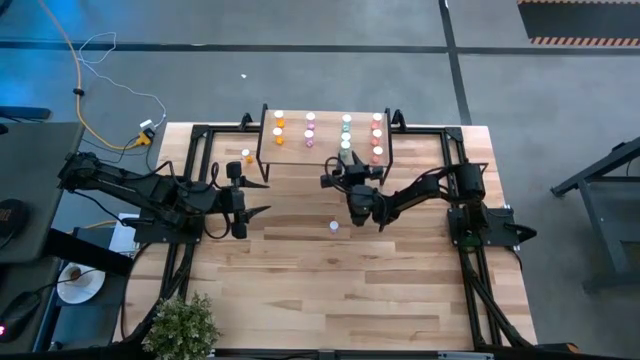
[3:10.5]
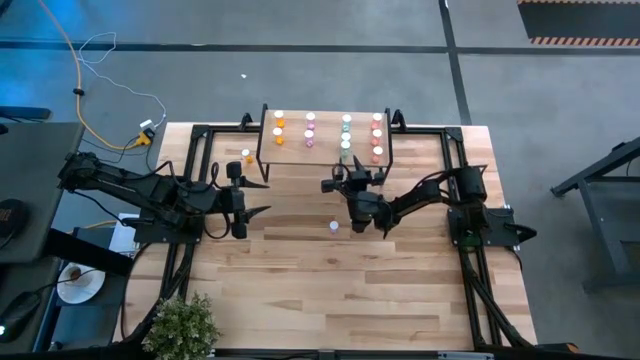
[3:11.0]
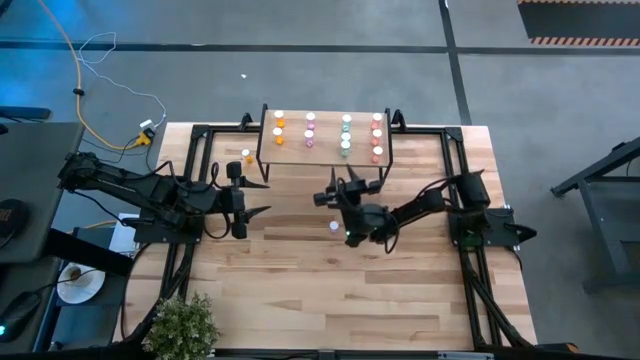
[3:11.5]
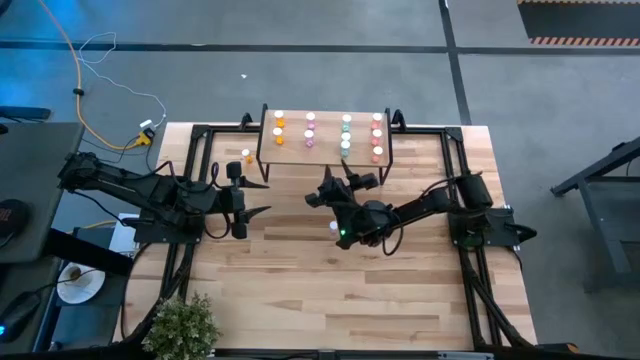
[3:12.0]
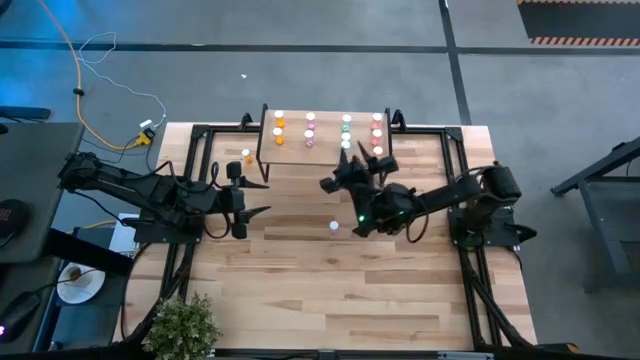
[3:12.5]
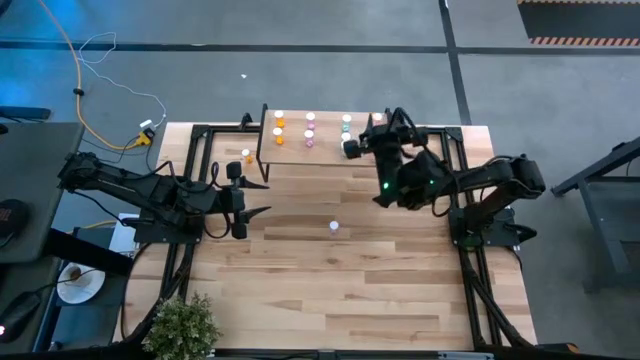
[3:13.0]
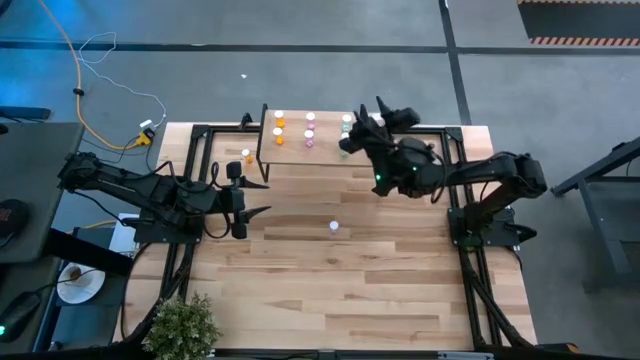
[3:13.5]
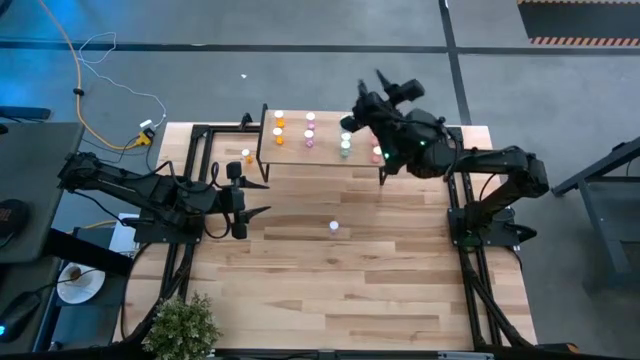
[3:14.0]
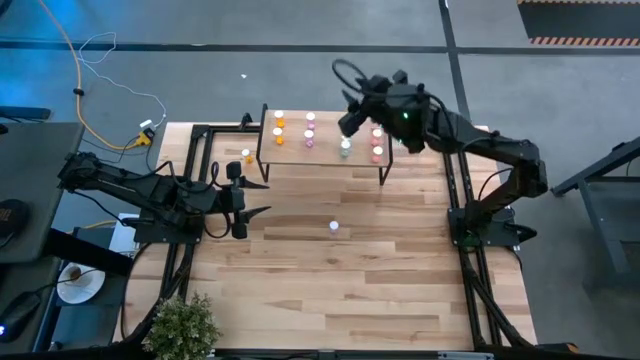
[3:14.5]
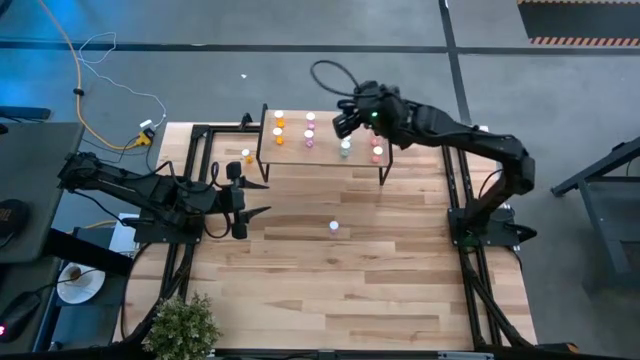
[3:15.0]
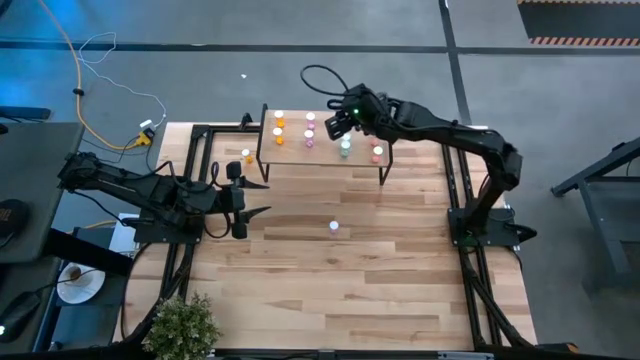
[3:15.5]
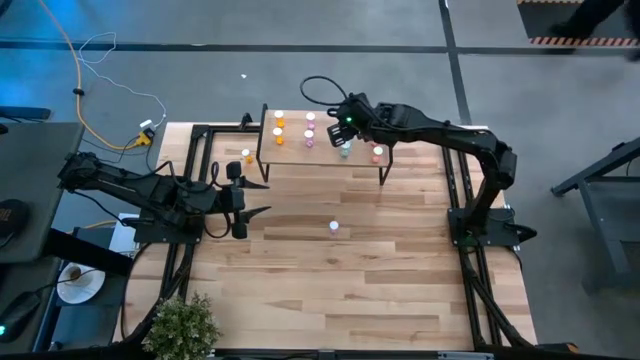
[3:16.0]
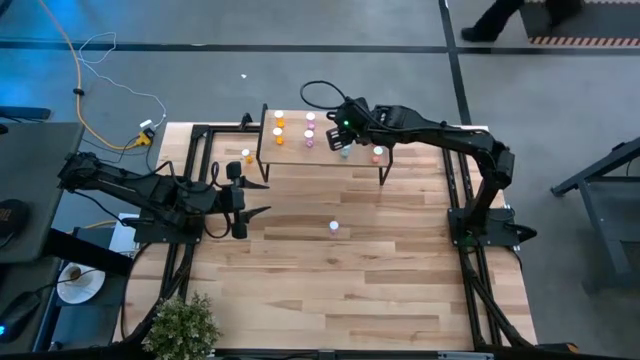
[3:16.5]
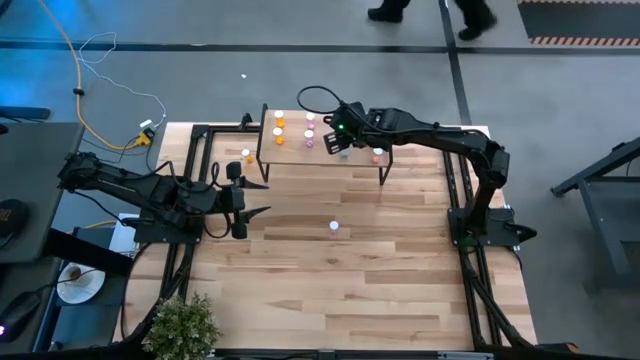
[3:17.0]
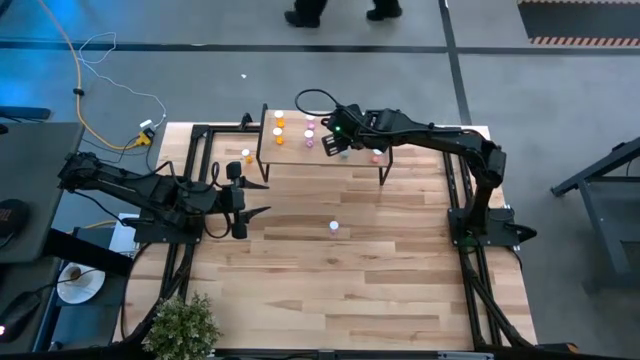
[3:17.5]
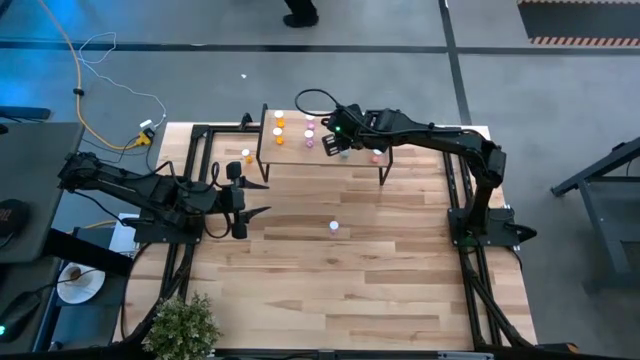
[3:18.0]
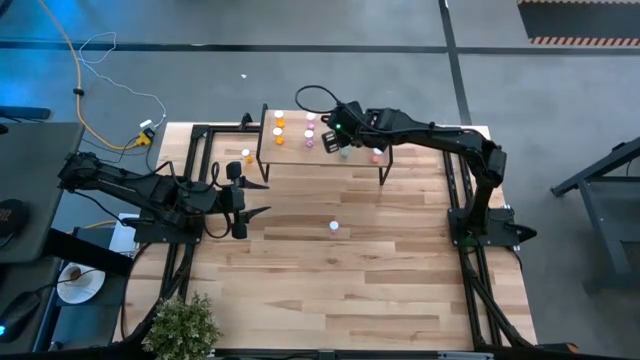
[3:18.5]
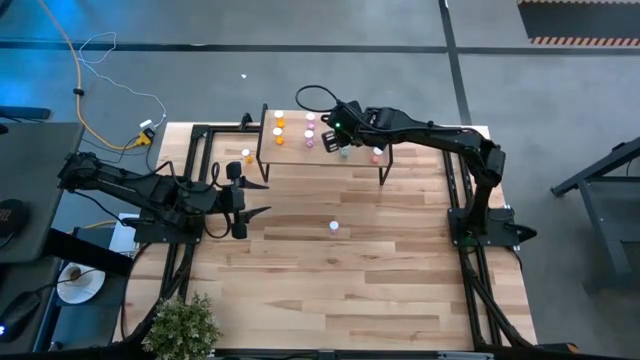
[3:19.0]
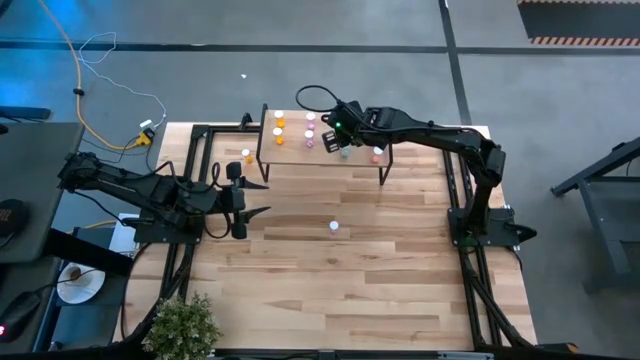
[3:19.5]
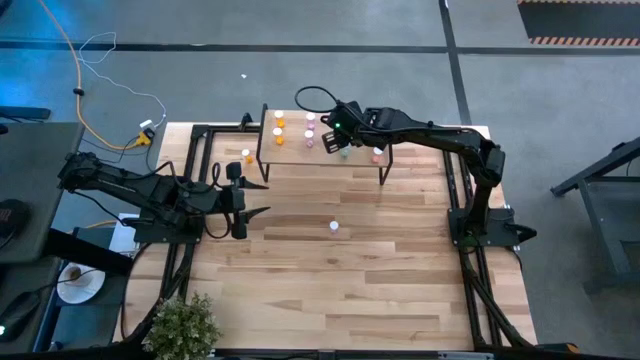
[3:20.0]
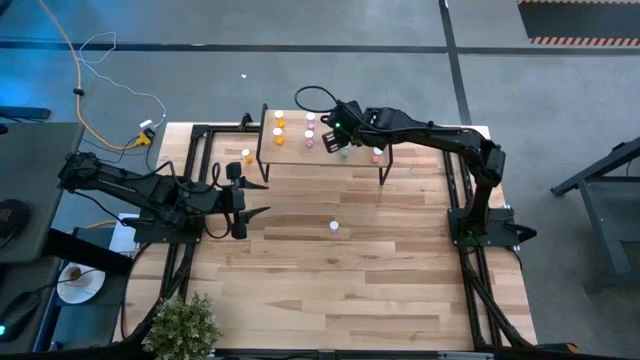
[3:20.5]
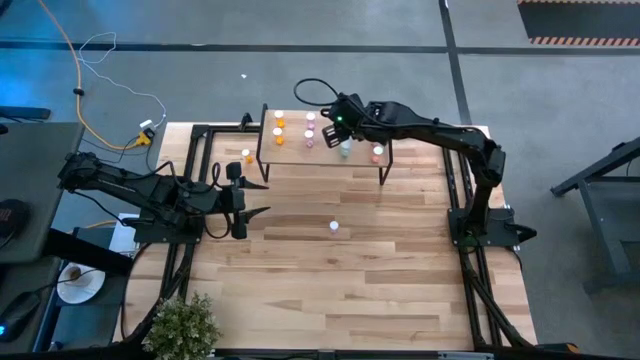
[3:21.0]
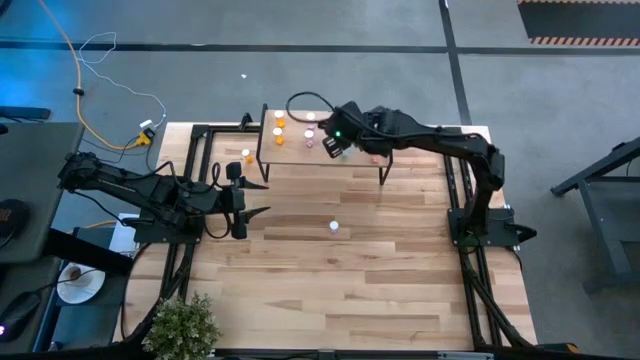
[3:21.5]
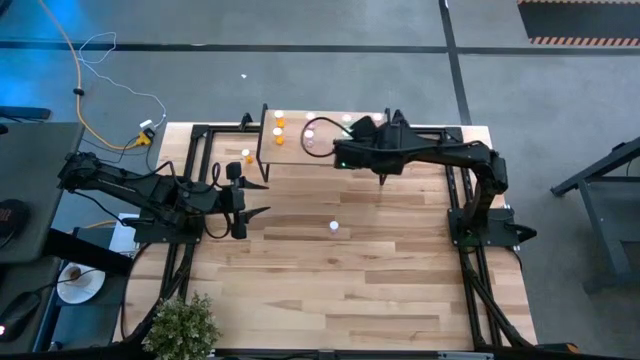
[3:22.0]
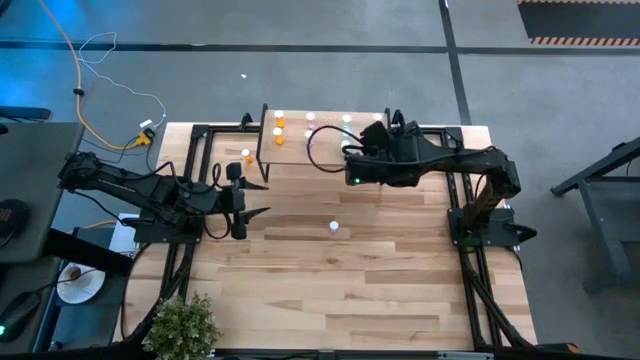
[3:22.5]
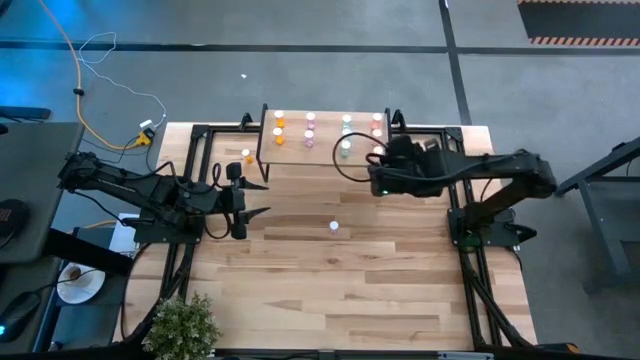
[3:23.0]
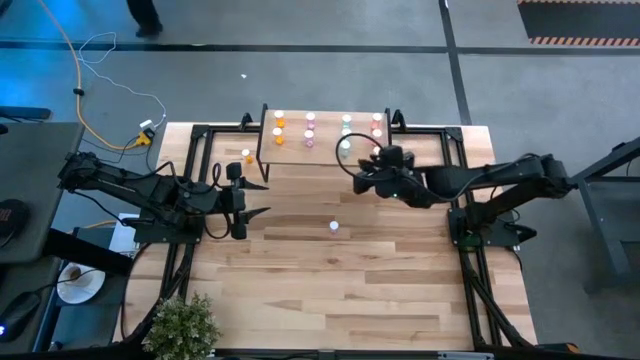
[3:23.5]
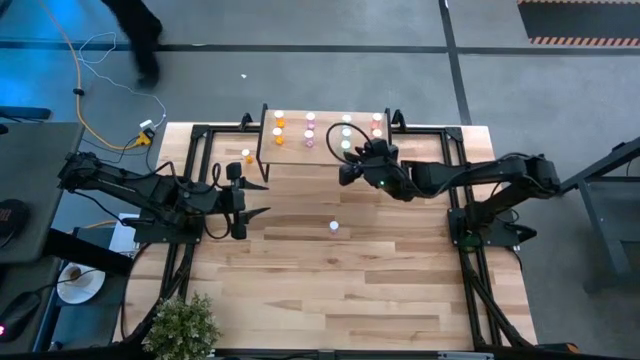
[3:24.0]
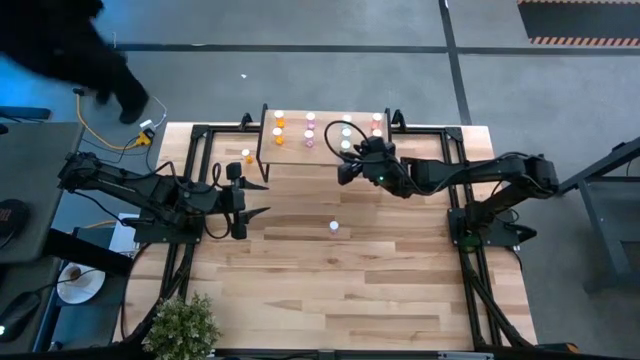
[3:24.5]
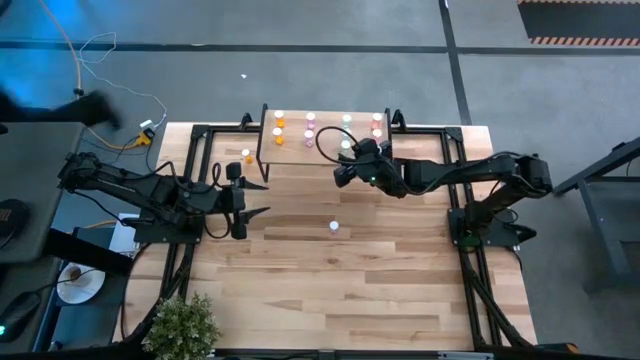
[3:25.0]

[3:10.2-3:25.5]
Task: Pick and place medicine bottles onto shelf by color
Adjust the green pill bottles on the shelf

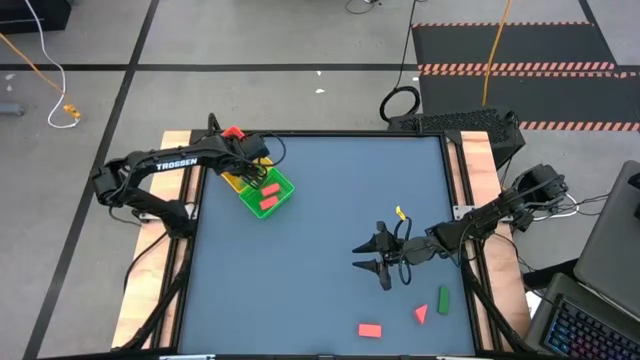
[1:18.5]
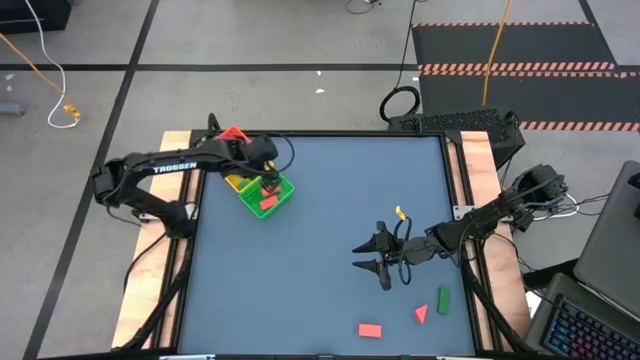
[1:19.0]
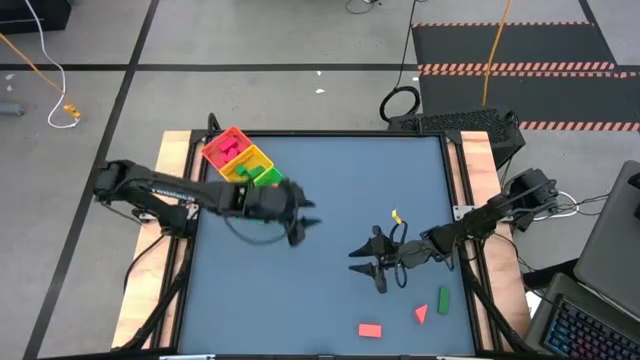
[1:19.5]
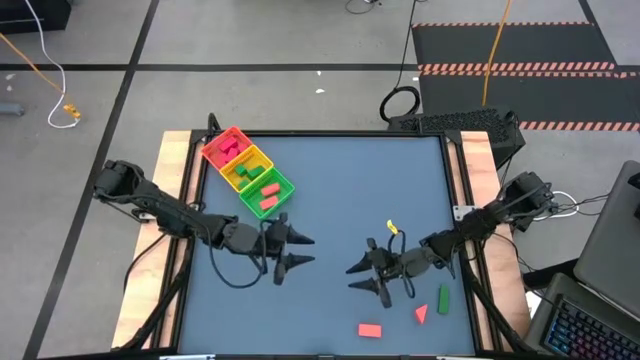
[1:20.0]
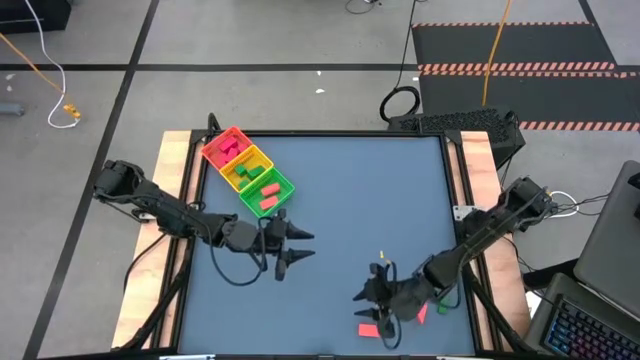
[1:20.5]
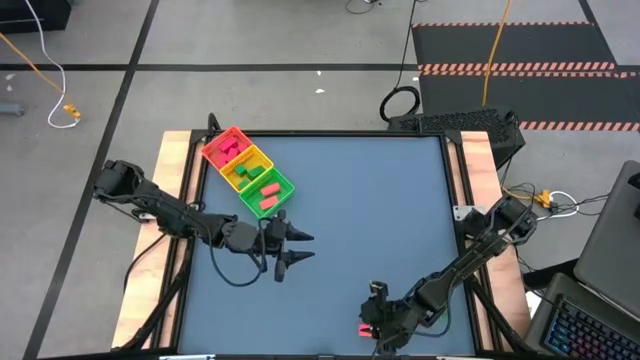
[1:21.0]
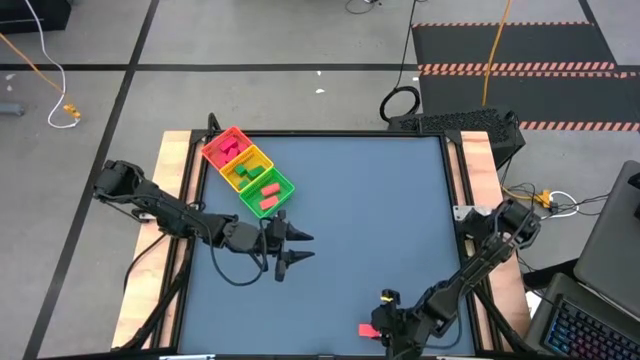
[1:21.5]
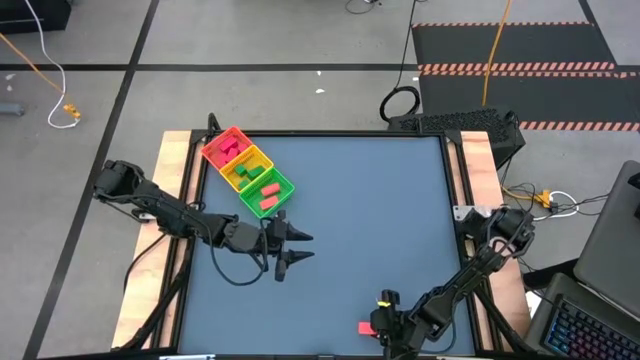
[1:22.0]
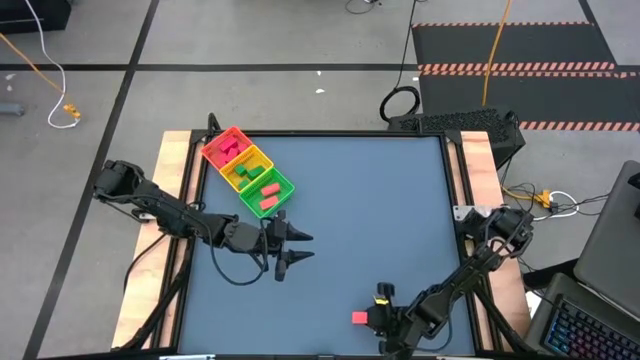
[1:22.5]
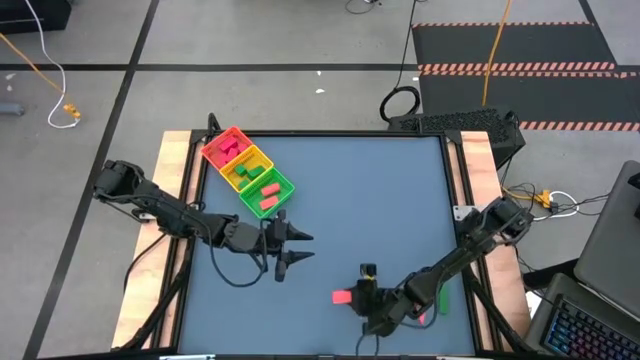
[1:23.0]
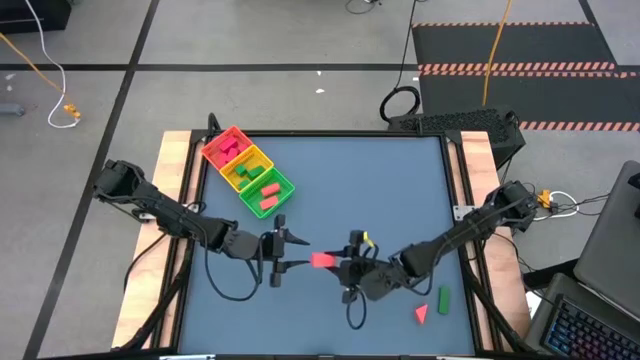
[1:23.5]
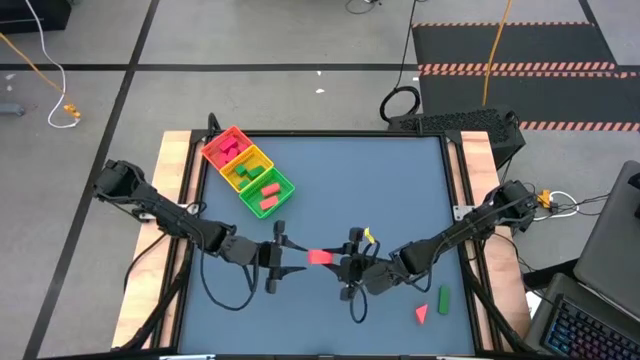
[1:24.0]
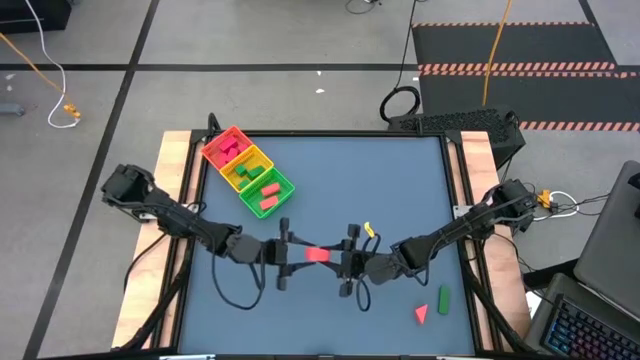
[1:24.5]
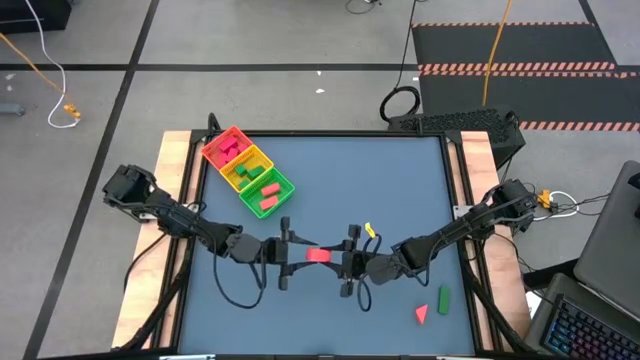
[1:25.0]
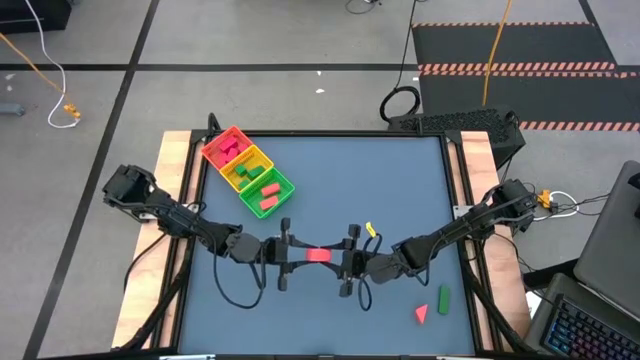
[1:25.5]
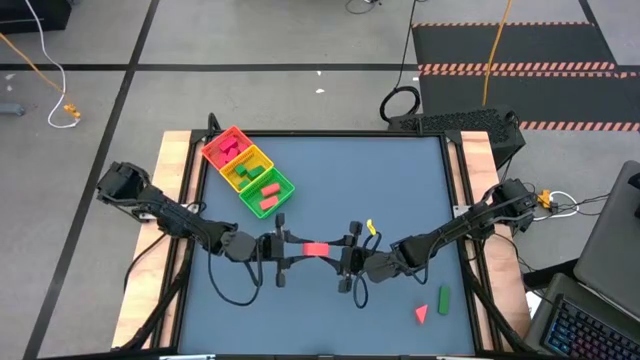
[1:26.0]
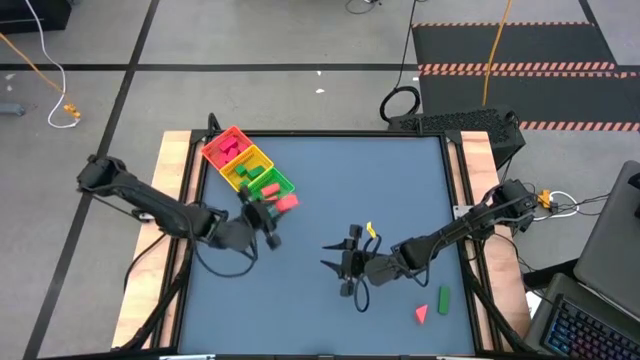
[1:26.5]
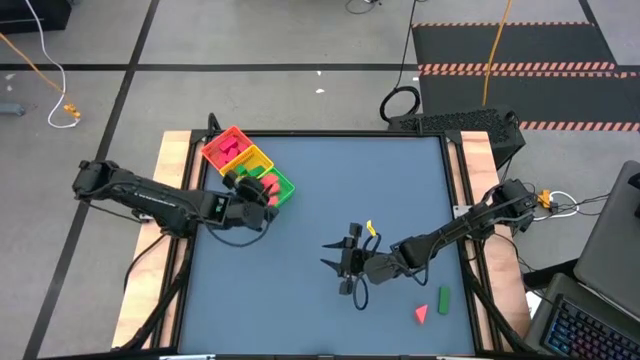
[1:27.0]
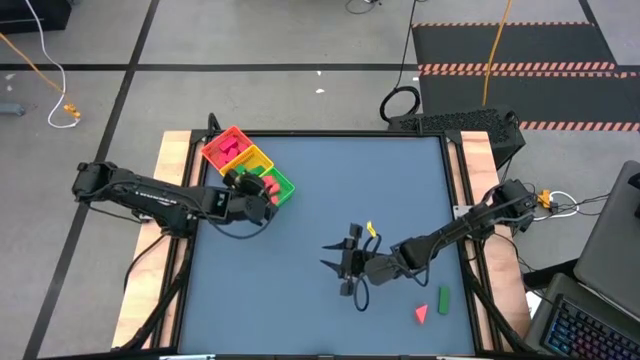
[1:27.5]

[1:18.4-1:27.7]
Task: Sort & place blocks by color
Put the red block into the green basket
